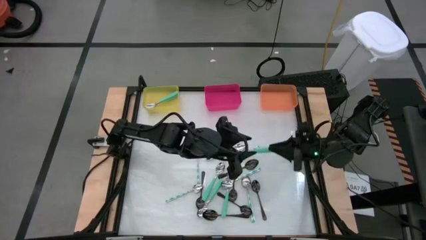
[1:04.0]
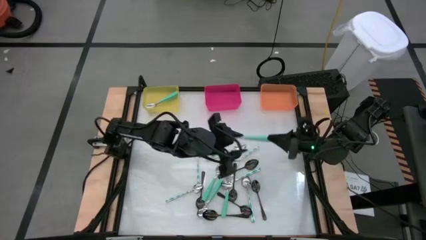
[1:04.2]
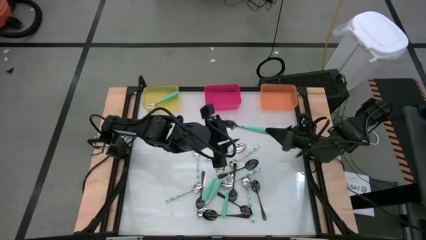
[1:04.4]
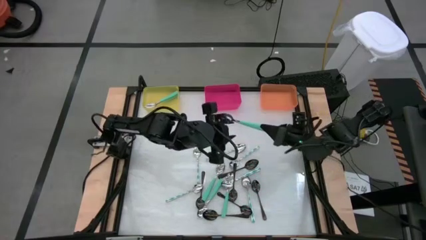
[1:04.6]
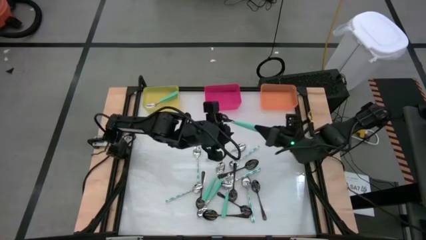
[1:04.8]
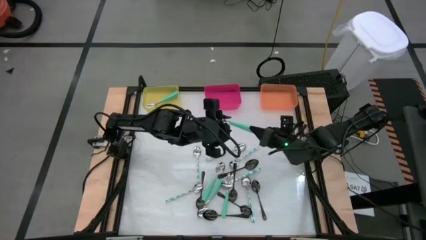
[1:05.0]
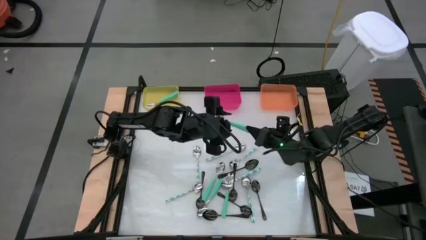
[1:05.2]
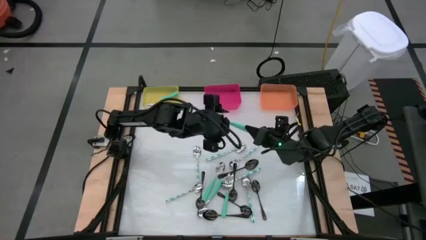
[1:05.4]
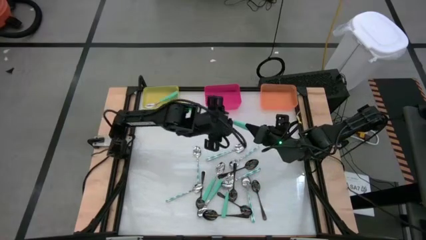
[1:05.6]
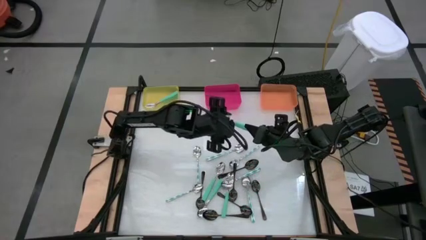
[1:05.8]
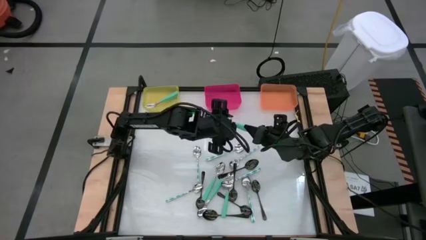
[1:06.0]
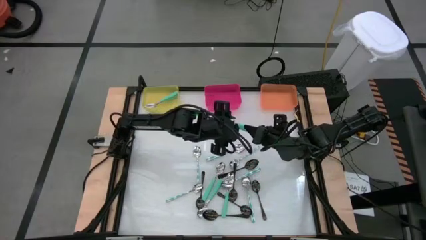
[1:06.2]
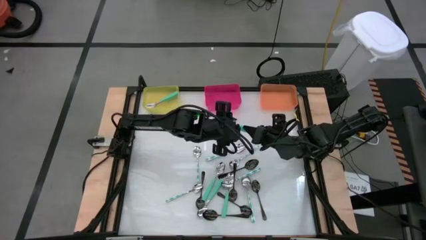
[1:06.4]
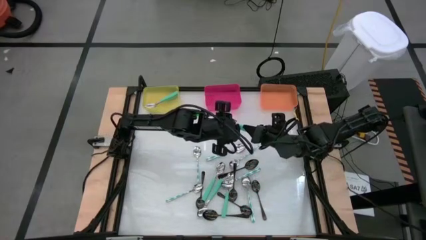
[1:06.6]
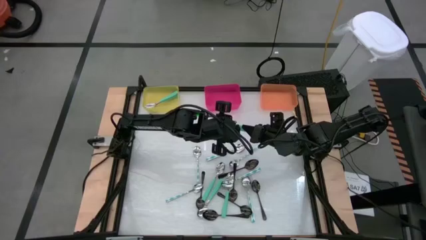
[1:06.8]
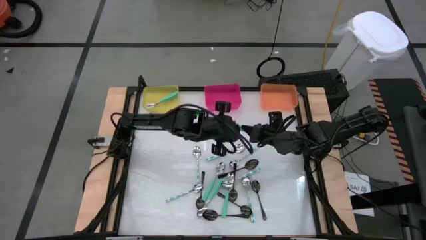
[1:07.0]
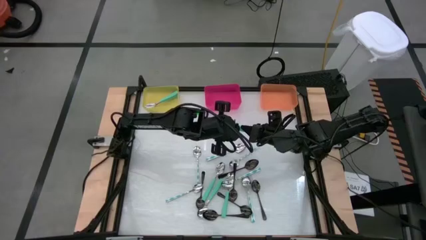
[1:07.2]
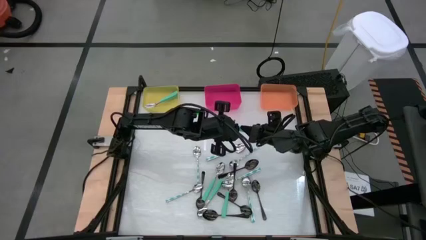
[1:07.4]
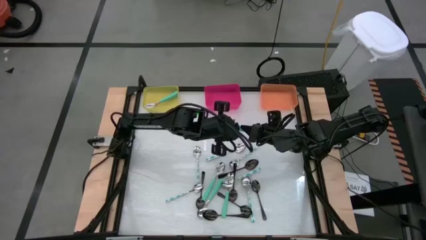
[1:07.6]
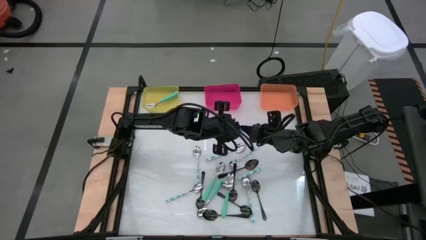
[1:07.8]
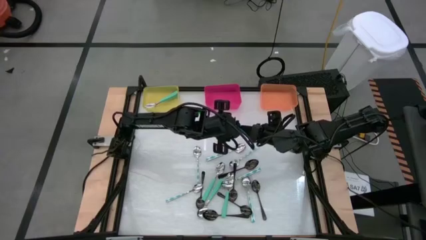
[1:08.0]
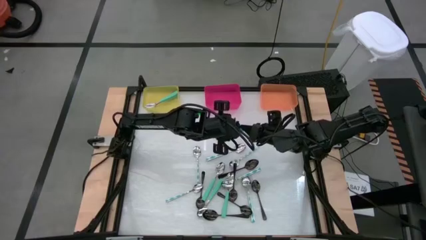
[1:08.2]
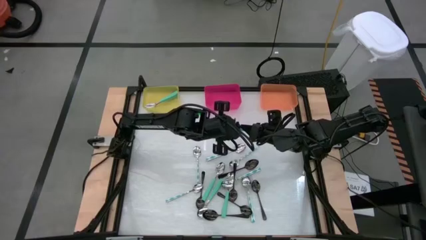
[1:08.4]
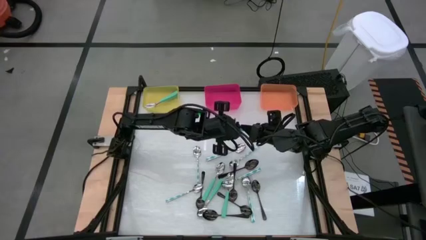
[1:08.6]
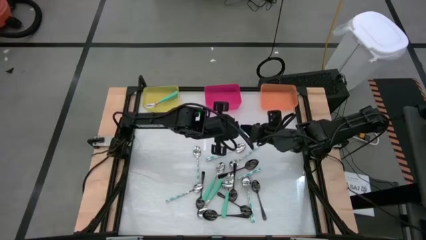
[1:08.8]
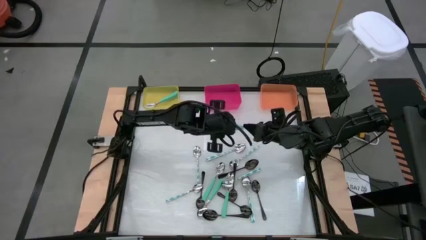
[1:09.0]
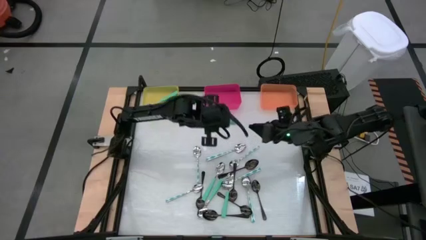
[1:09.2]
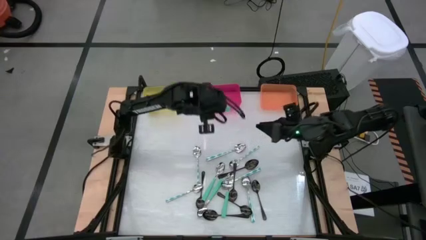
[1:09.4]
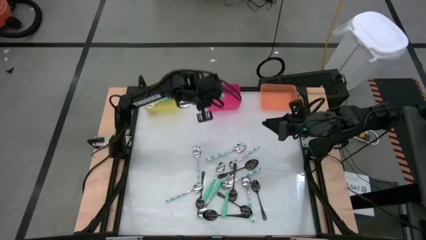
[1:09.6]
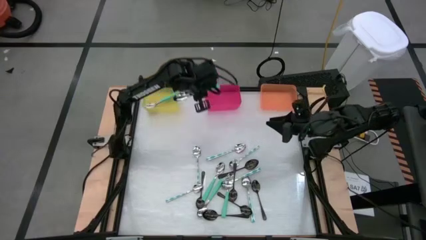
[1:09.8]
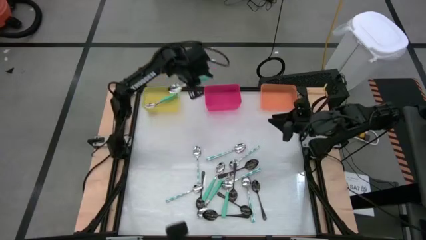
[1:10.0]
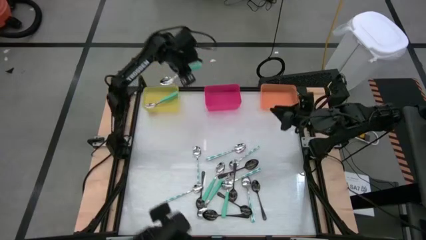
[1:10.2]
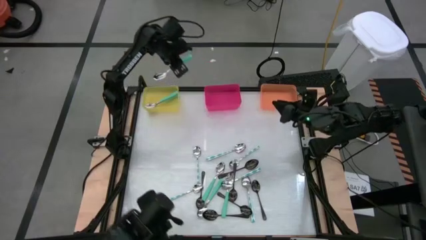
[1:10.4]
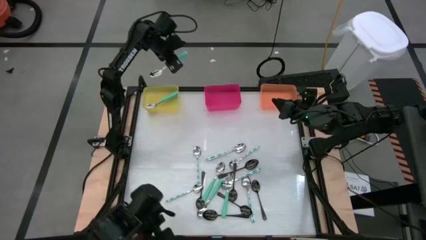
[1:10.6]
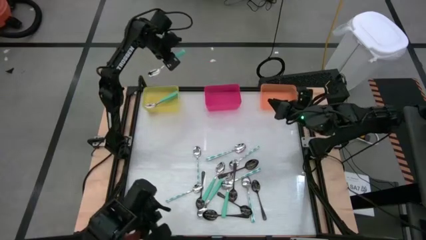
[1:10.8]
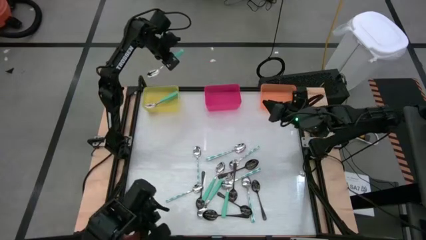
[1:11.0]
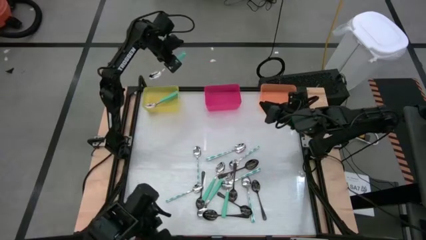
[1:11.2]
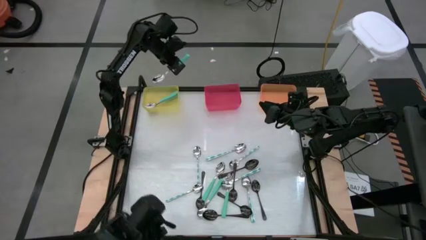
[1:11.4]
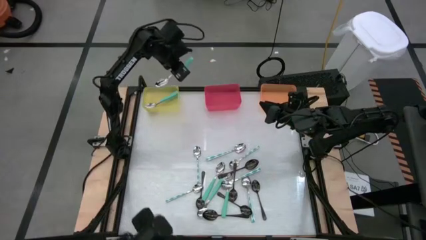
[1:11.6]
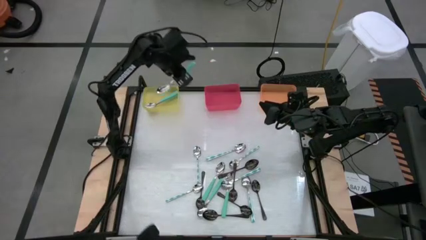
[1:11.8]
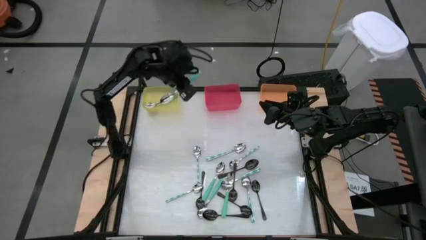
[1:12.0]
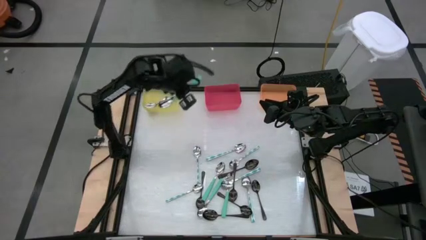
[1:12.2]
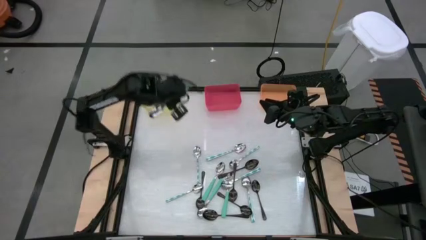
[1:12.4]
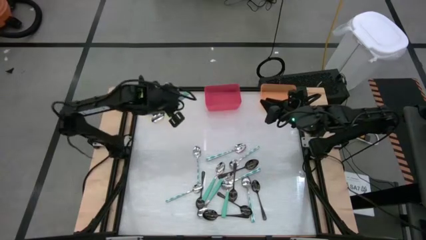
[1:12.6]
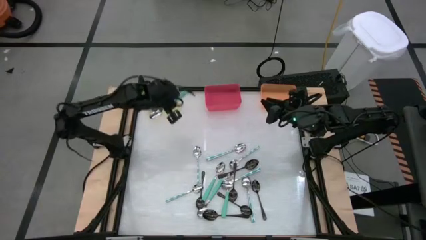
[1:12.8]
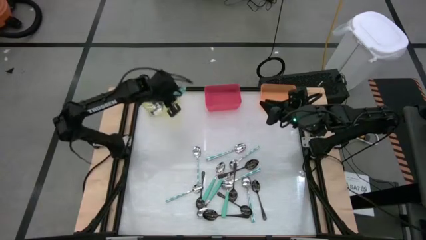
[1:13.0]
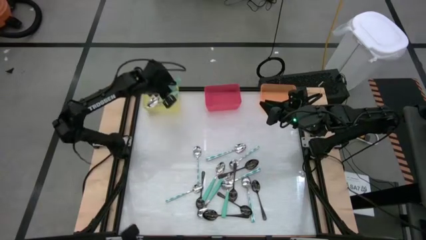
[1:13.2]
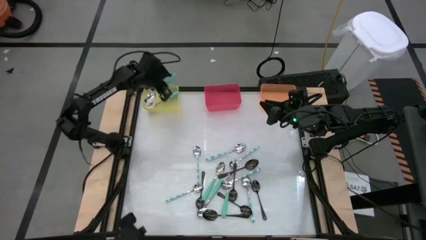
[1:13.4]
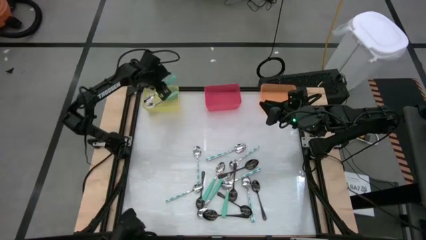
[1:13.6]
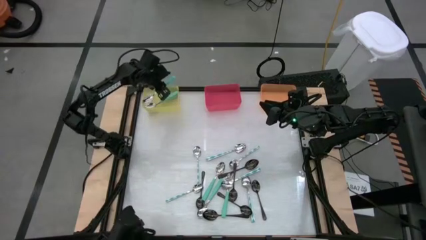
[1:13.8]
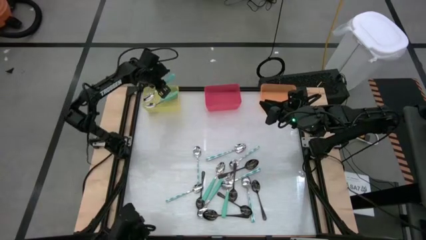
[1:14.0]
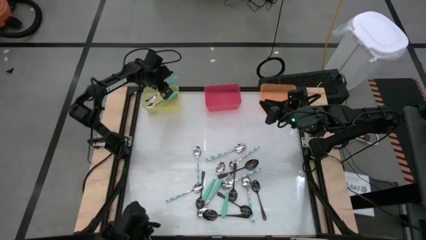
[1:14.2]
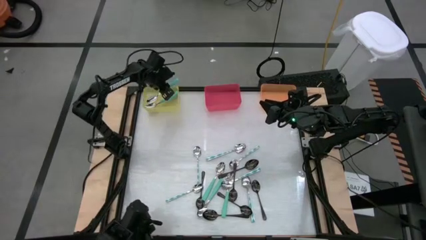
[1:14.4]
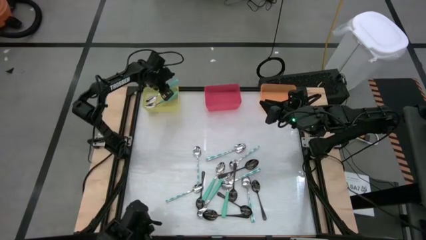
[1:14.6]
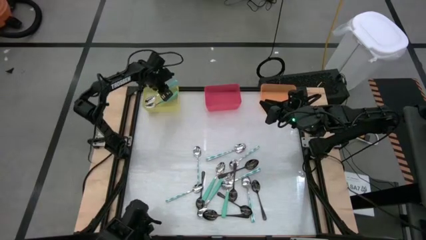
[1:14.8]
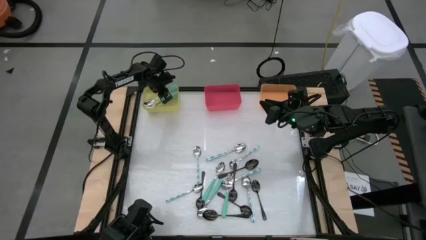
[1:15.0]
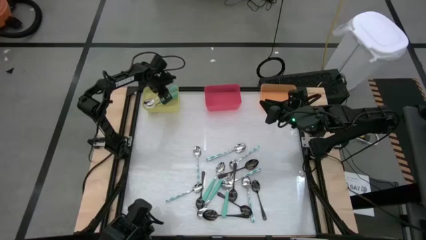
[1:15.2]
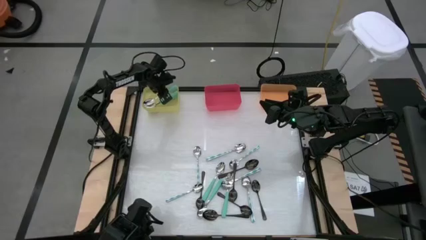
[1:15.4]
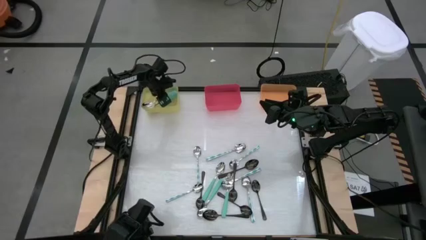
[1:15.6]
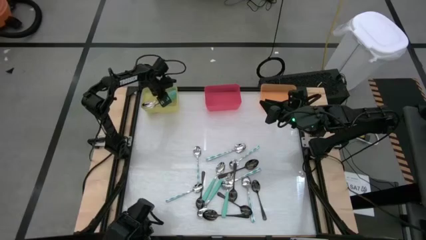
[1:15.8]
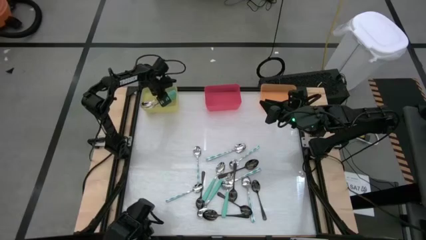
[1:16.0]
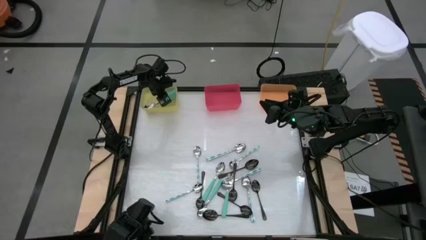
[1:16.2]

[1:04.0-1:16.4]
Task: Sort silverware by color (type)
Put the light green spoon into the yellow bin
